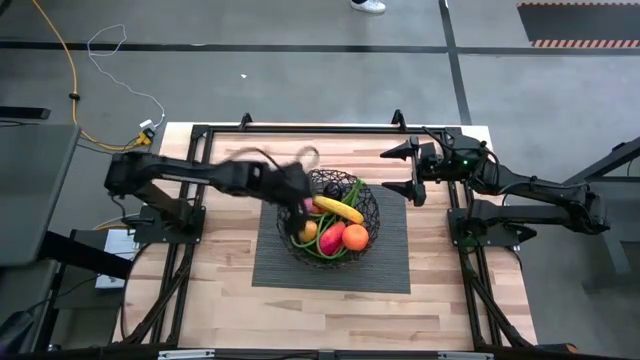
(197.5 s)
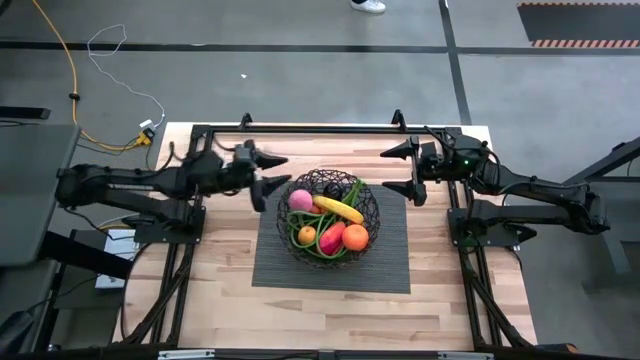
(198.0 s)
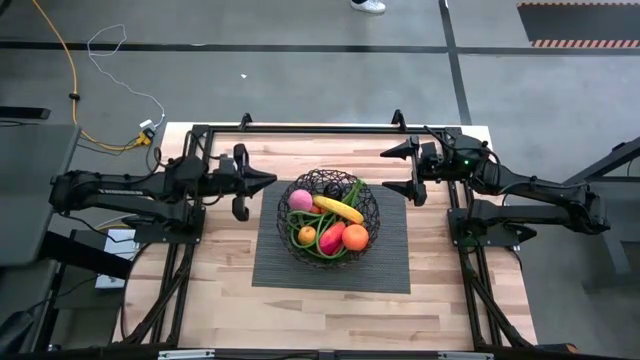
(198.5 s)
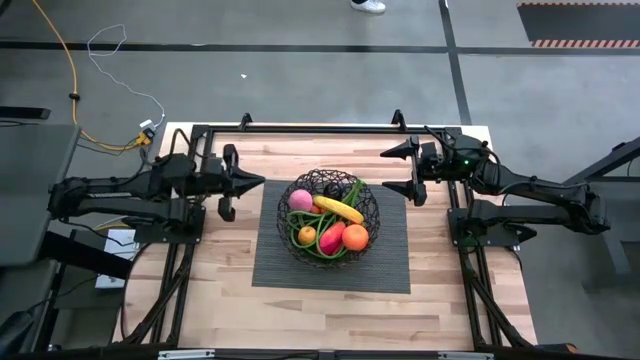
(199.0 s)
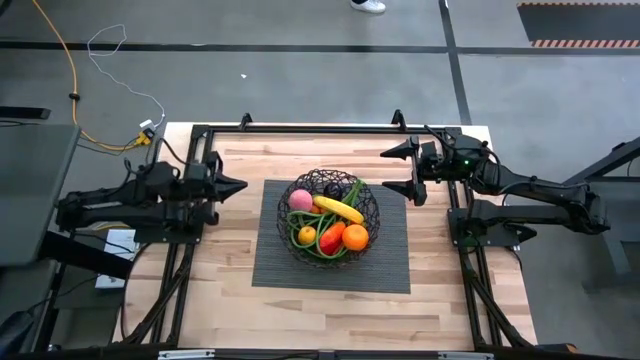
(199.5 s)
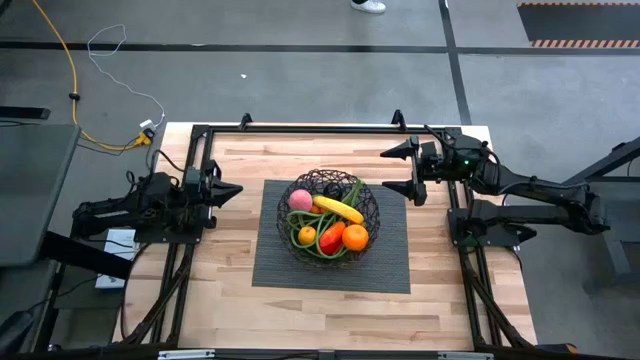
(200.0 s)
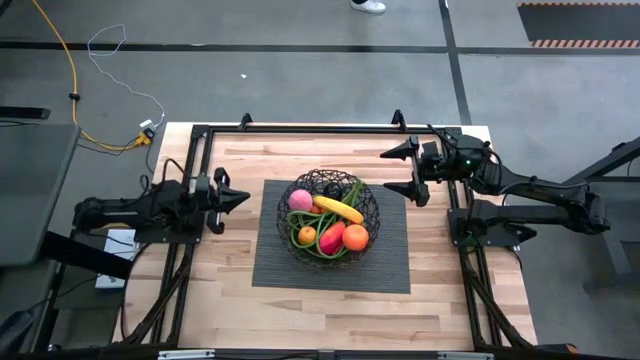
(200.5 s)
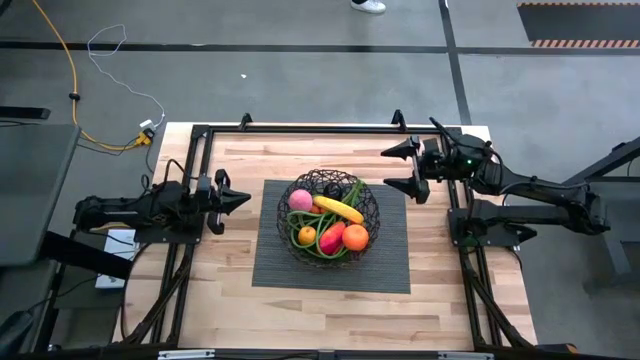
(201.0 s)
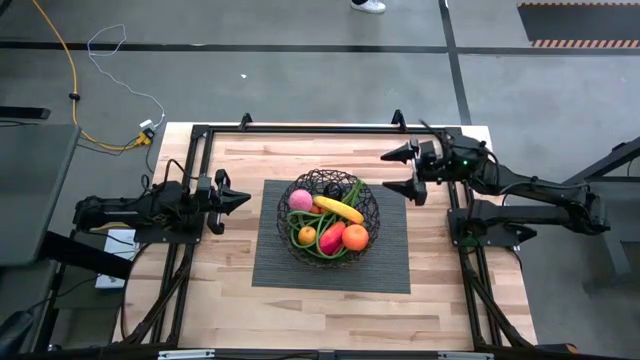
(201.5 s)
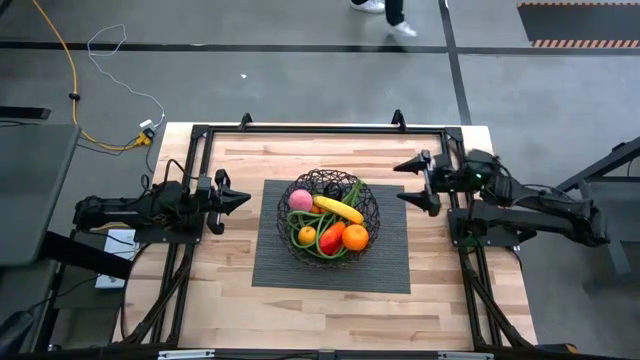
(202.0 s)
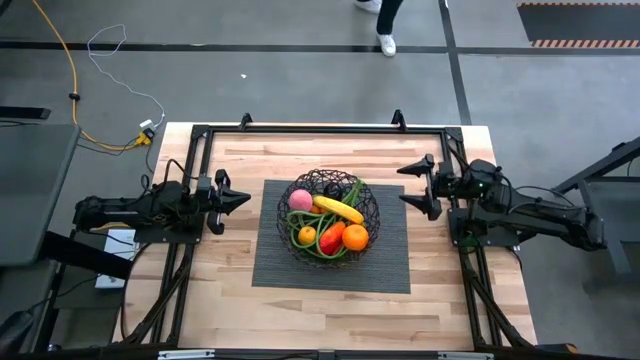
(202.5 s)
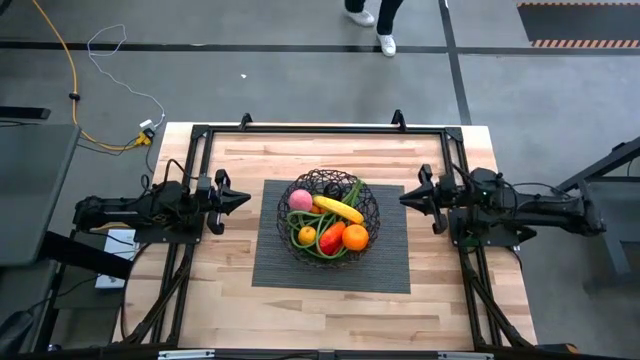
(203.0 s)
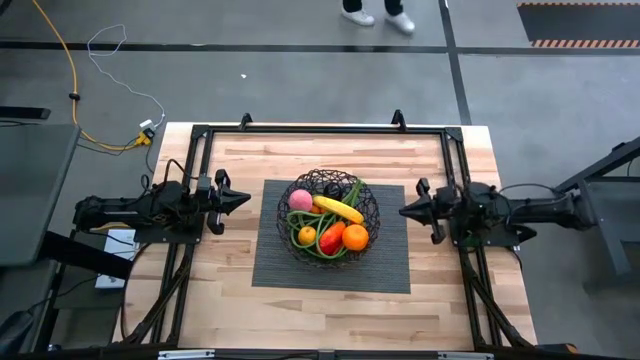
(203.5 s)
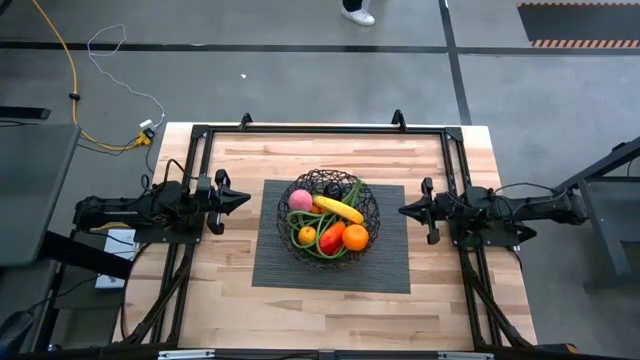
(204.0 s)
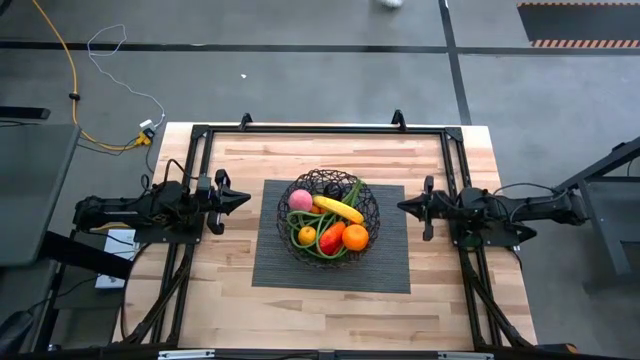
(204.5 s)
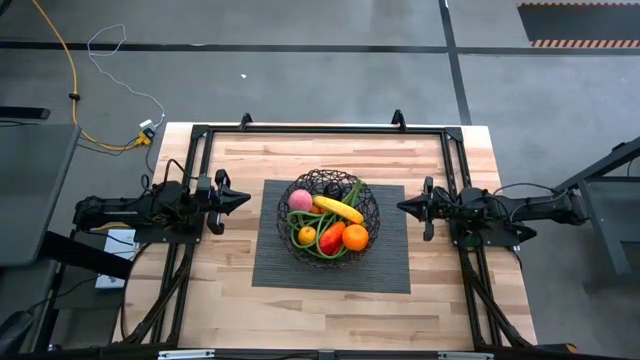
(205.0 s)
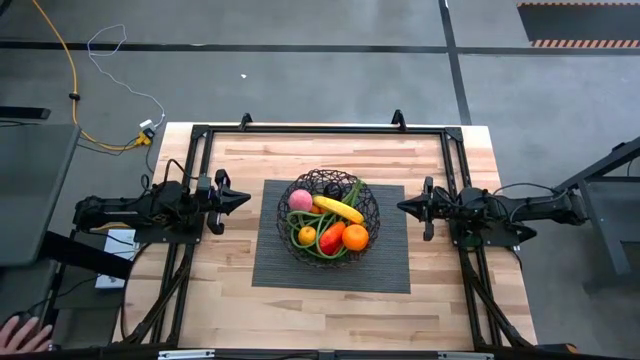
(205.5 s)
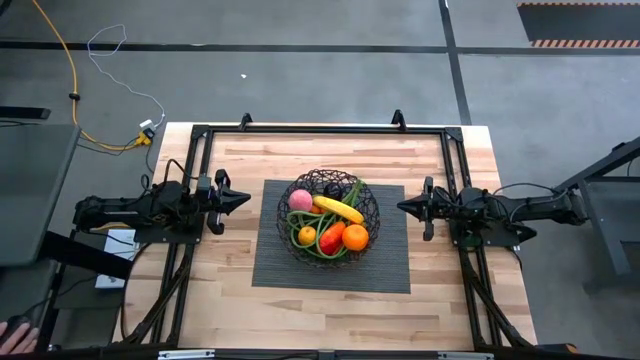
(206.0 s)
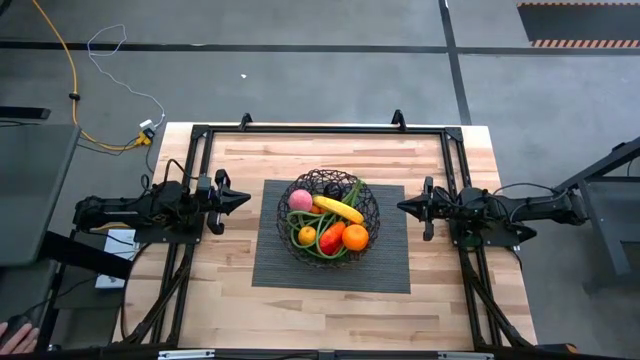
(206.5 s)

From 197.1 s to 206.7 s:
Task: Build produce basket
Return to Home Position

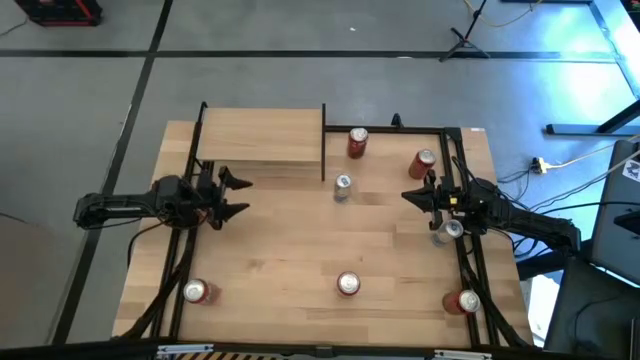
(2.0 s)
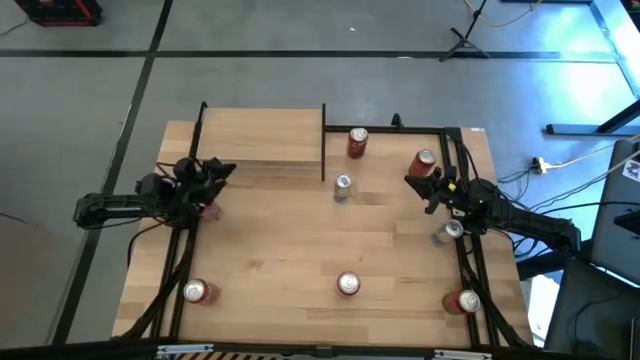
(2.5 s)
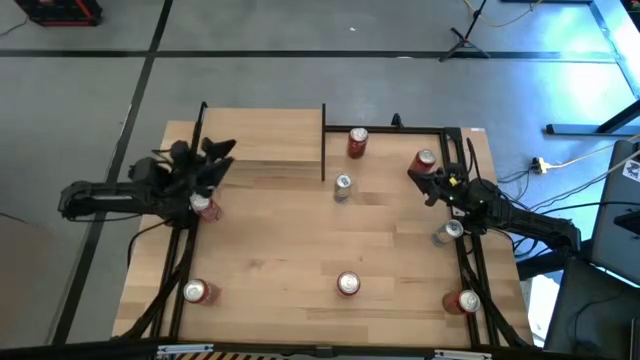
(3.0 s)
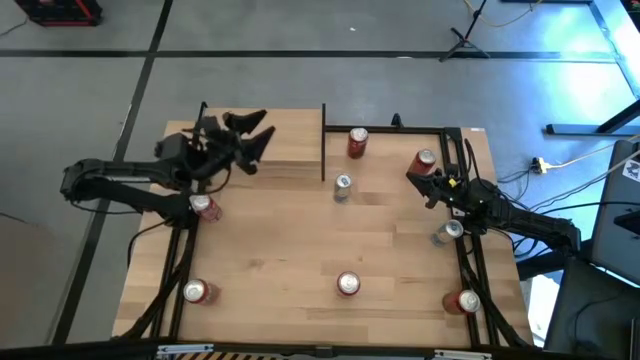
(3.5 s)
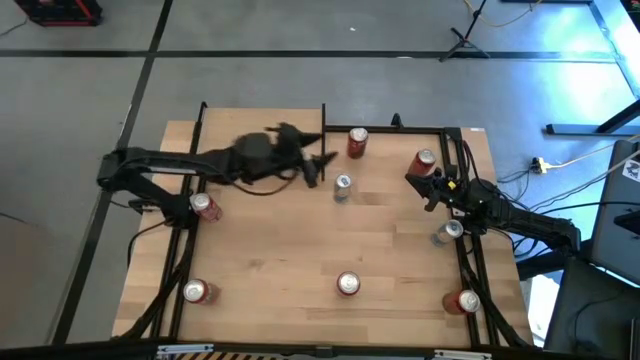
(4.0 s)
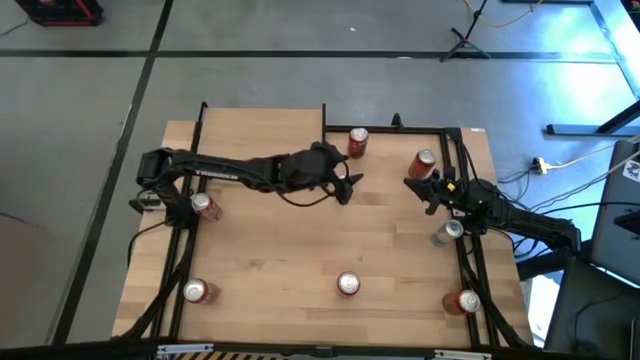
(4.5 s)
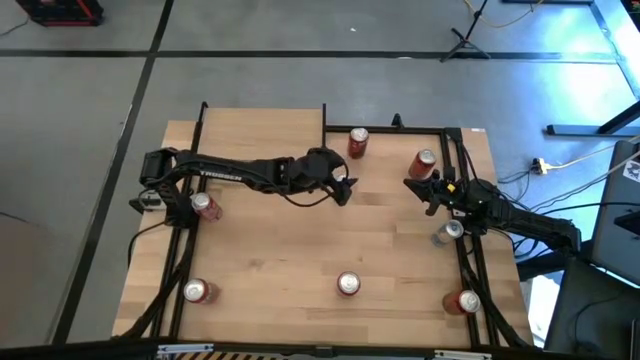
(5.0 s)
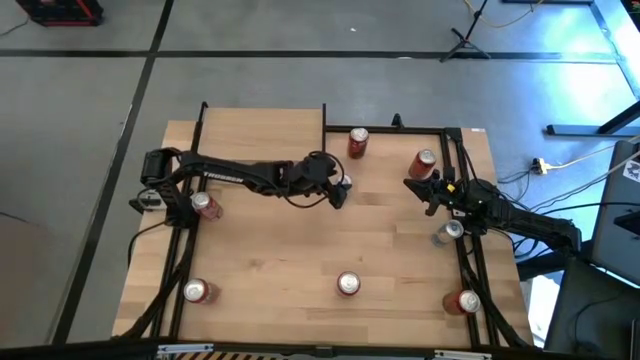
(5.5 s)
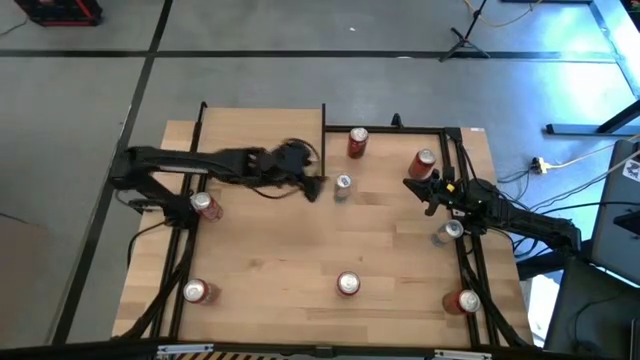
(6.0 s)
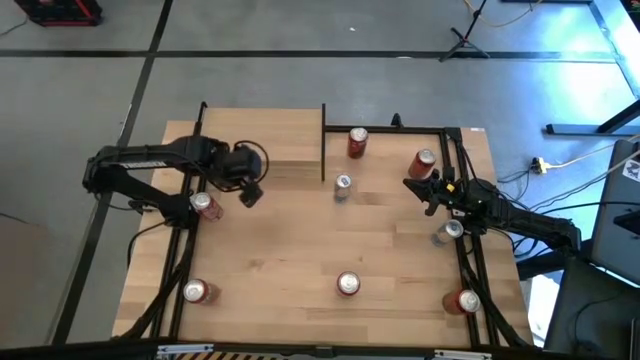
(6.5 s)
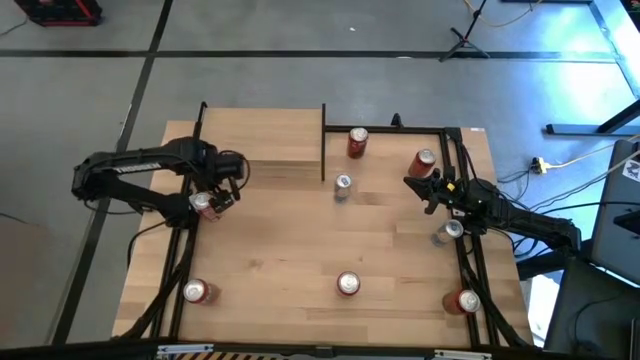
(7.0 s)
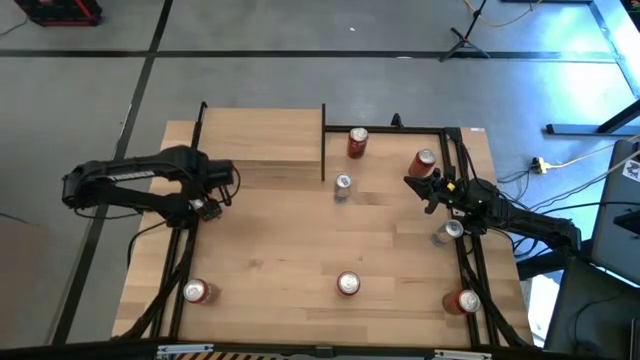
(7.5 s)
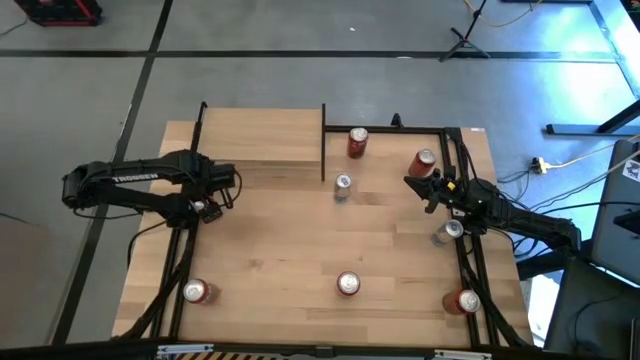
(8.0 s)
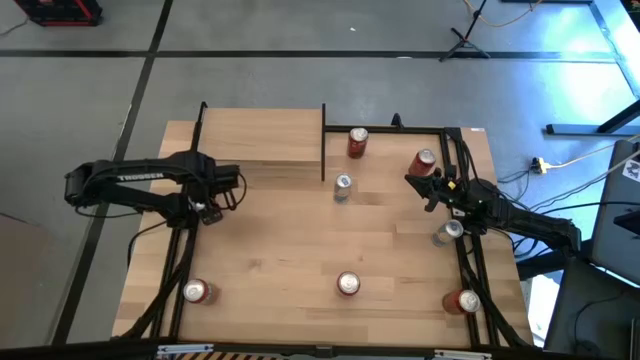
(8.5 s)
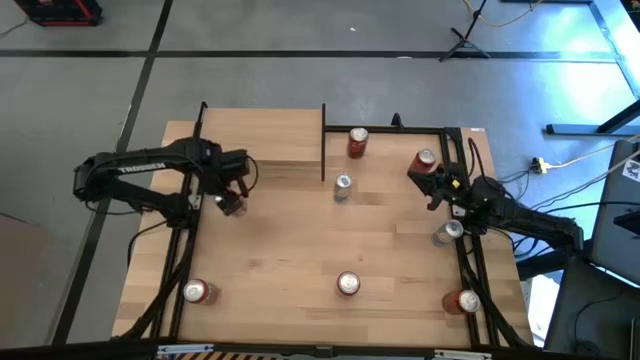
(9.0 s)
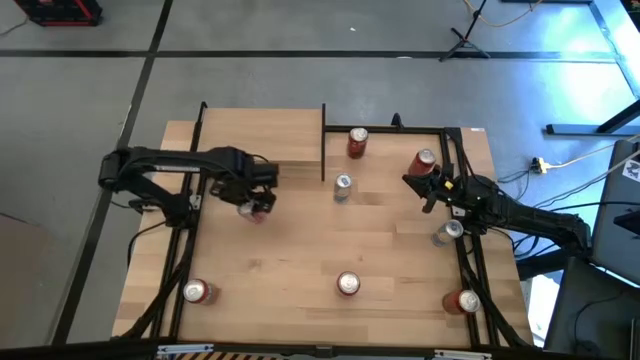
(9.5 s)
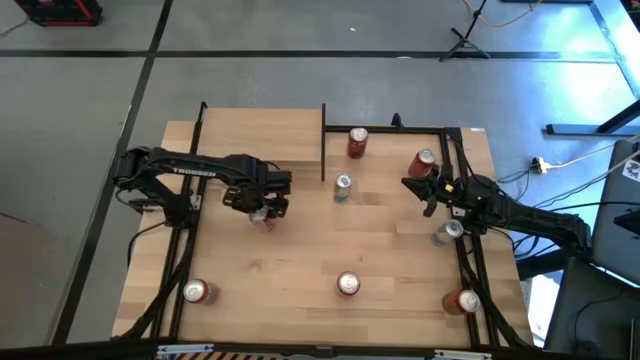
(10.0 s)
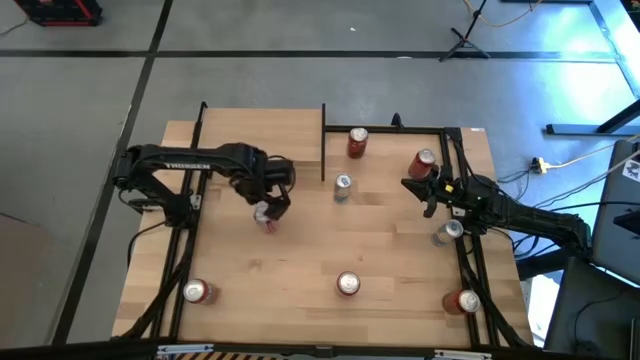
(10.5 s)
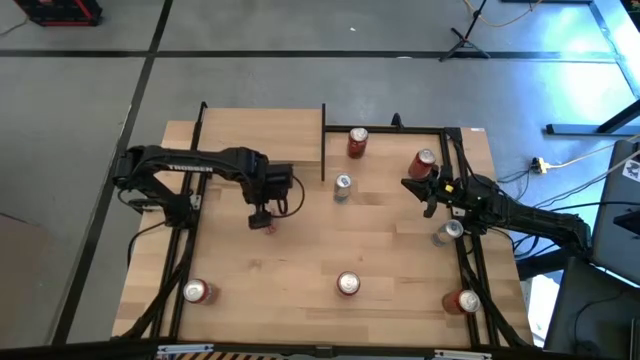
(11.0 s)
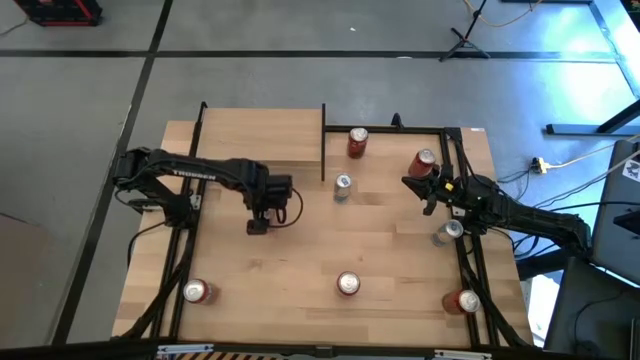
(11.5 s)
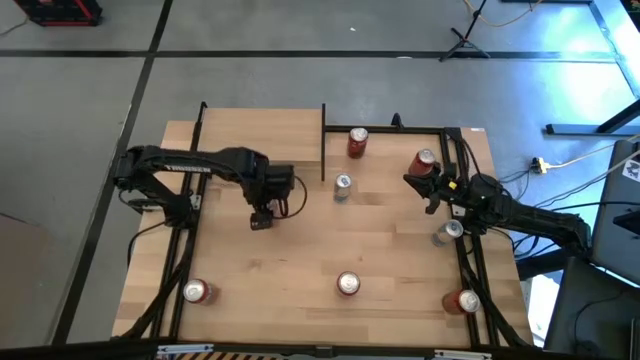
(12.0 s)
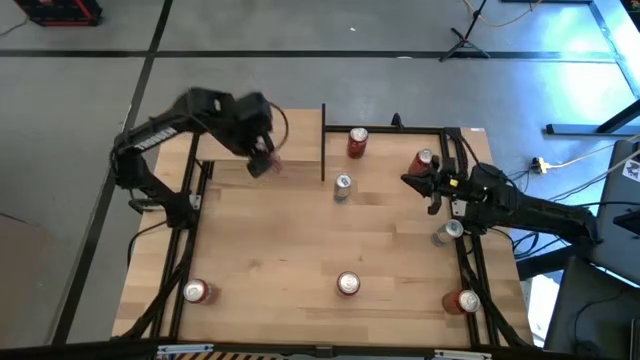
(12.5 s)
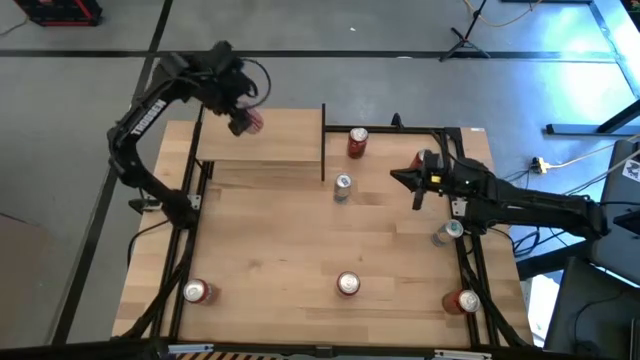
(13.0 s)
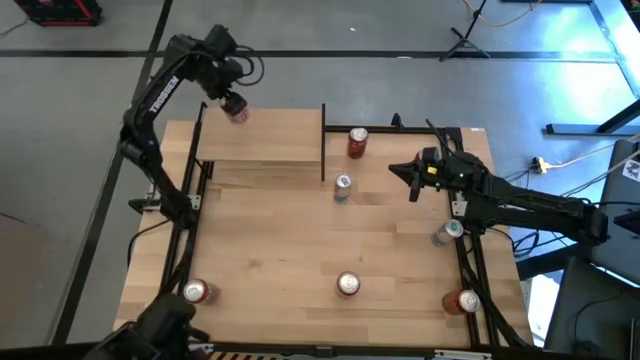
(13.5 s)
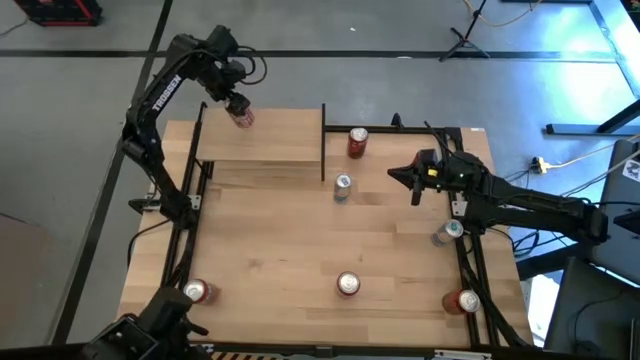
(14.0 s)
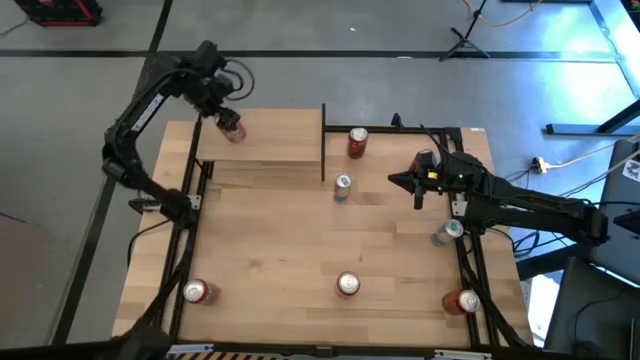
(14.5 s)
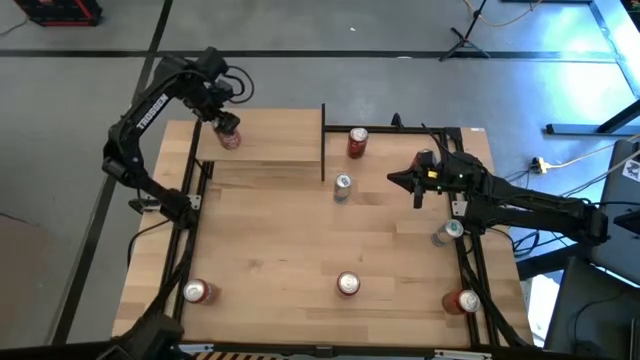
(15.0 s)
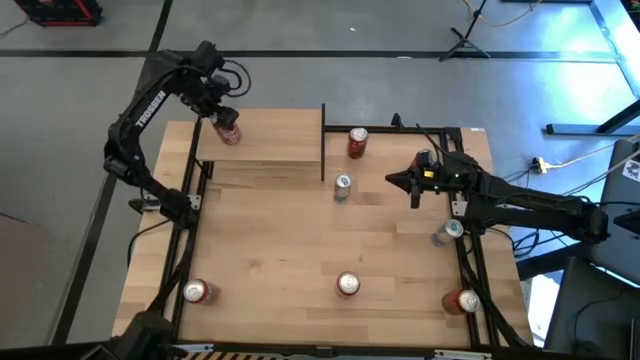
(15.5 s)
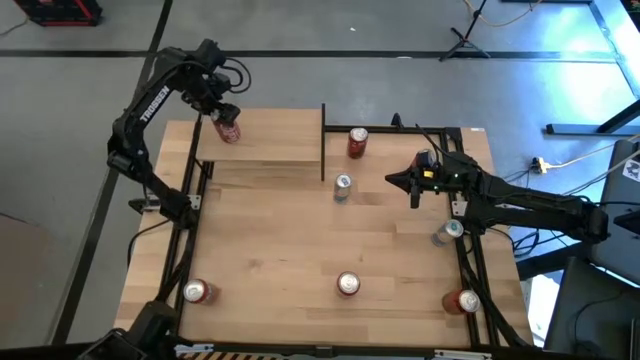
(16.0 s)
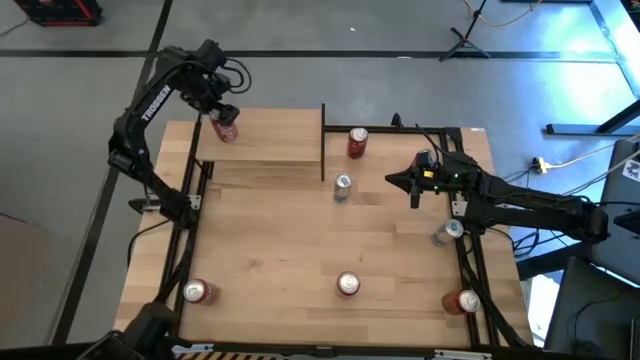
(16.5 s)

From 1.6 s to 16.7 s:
Task: Place canned beverage on shelf
Put the left red and white soda can on the shelf
